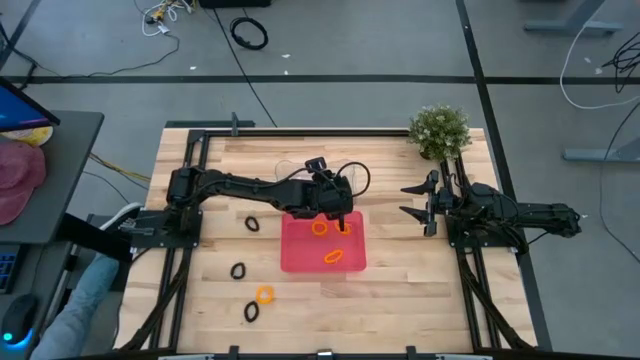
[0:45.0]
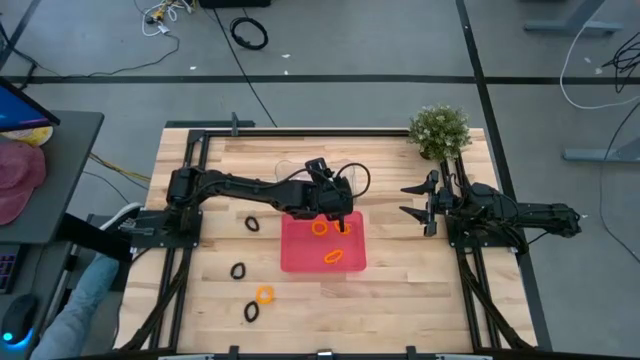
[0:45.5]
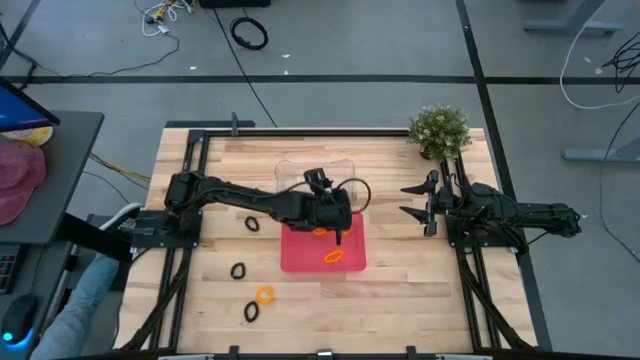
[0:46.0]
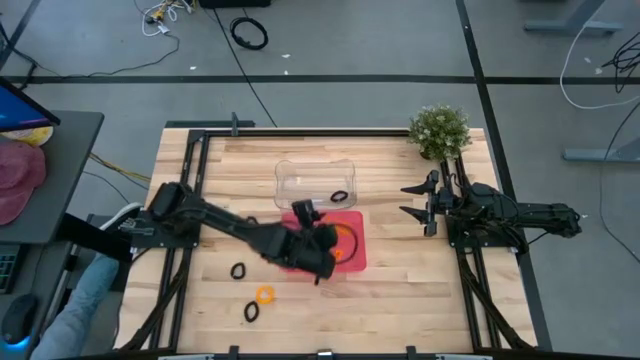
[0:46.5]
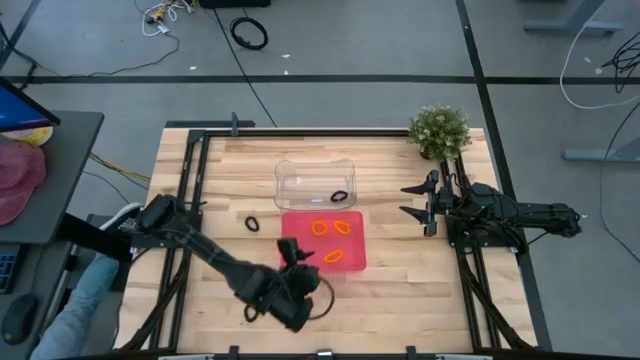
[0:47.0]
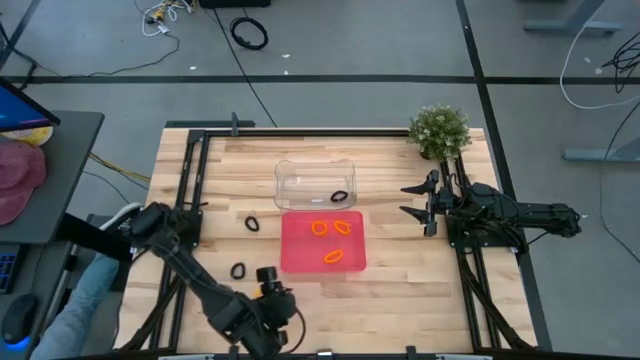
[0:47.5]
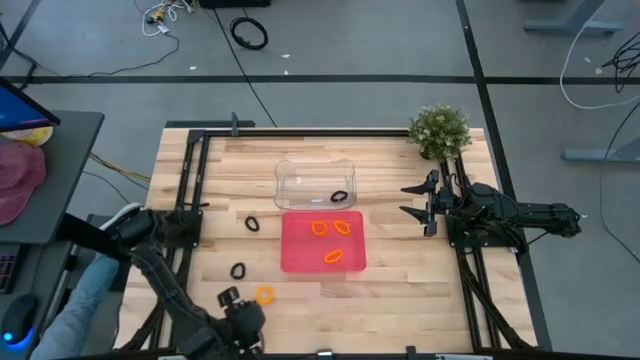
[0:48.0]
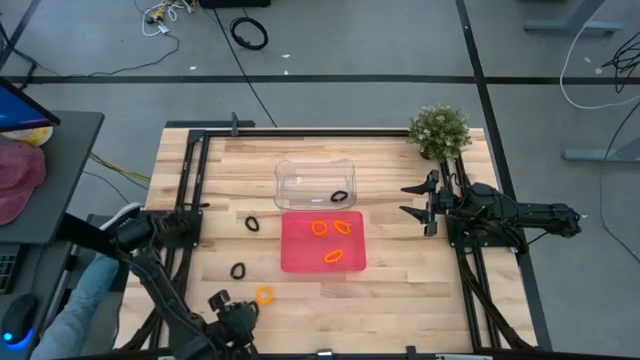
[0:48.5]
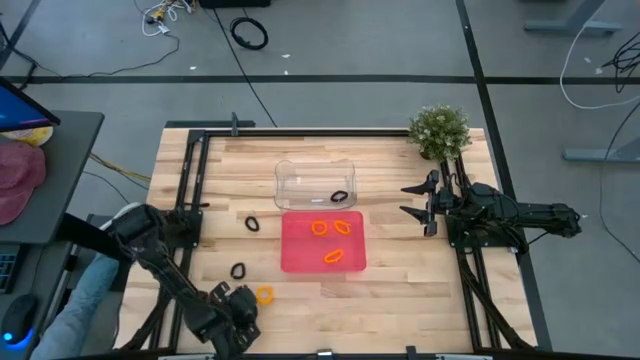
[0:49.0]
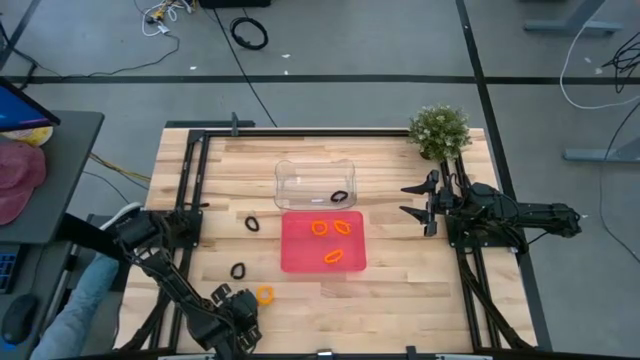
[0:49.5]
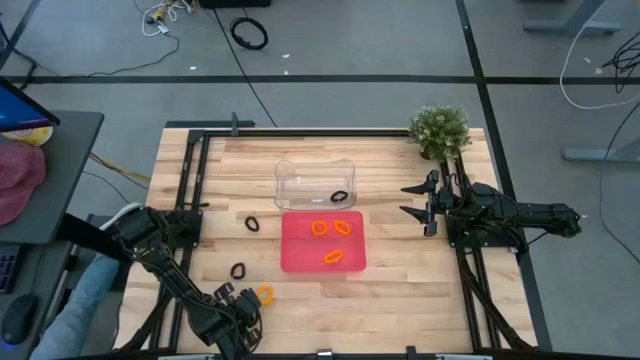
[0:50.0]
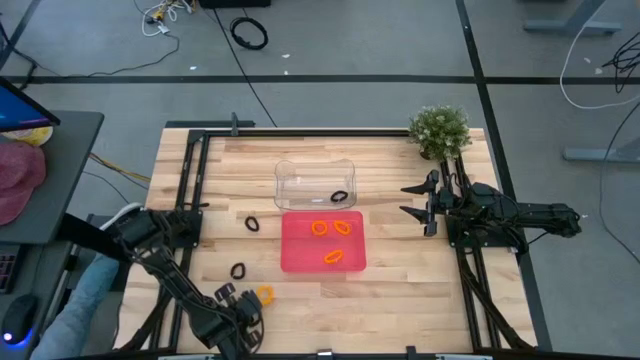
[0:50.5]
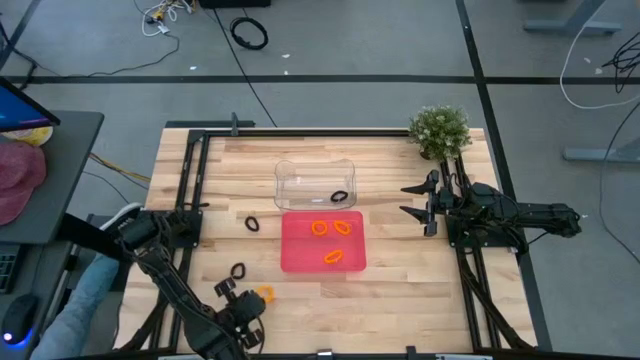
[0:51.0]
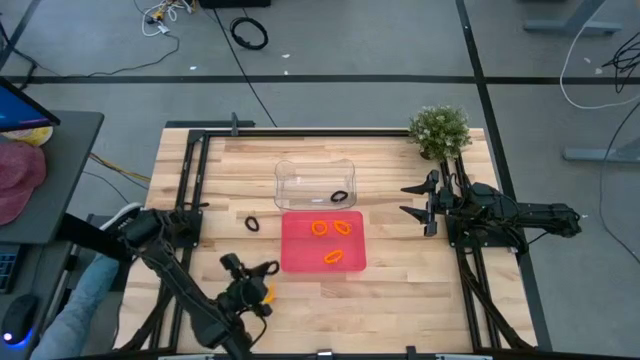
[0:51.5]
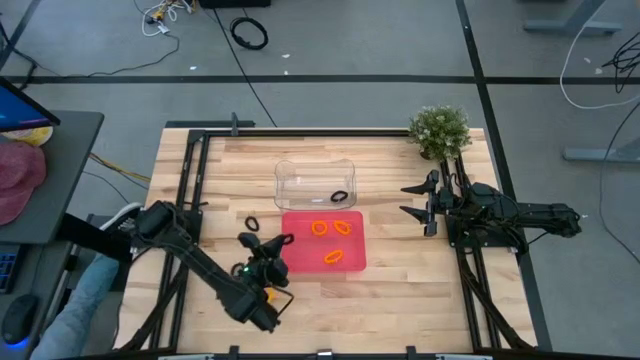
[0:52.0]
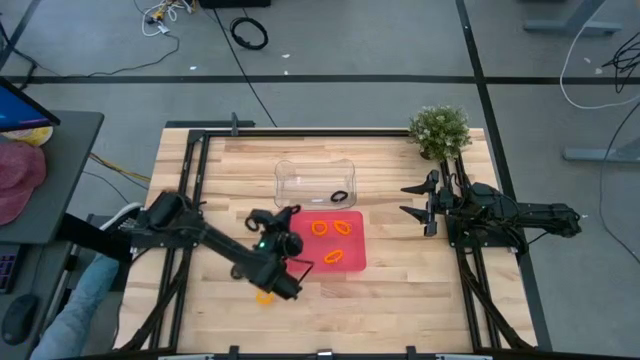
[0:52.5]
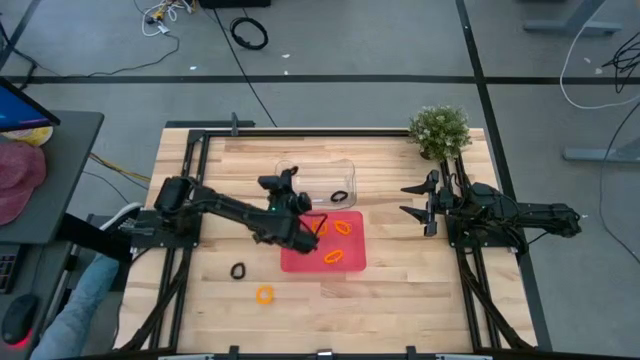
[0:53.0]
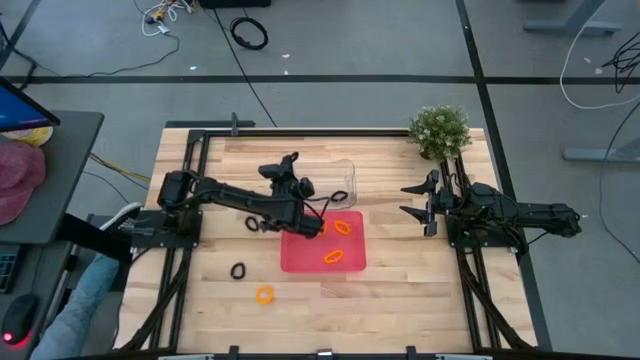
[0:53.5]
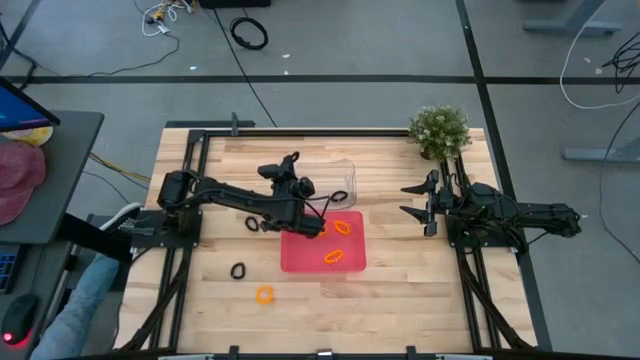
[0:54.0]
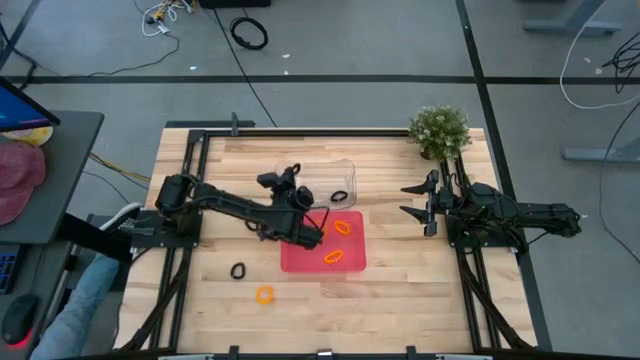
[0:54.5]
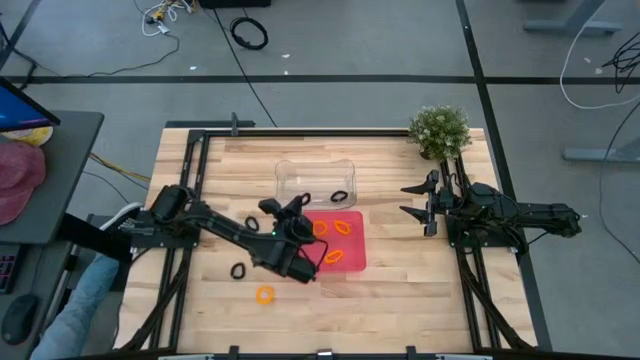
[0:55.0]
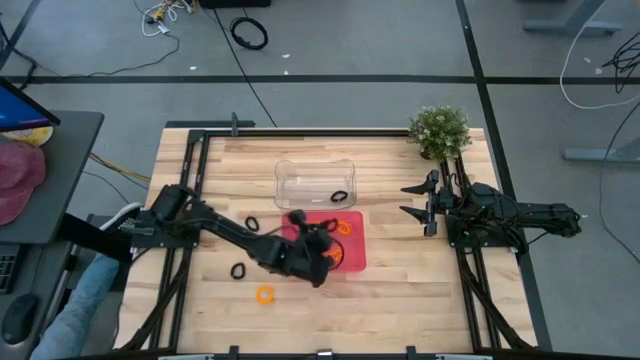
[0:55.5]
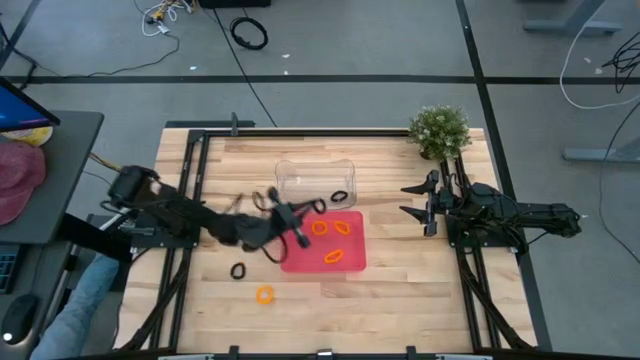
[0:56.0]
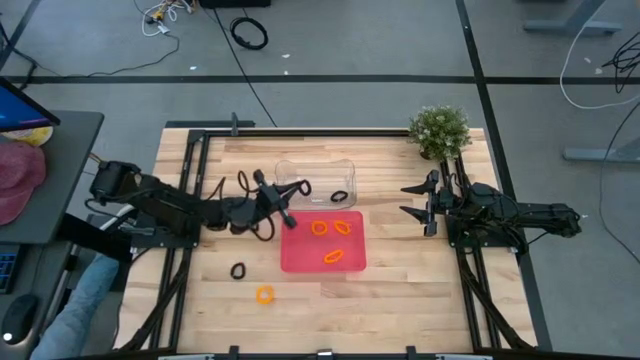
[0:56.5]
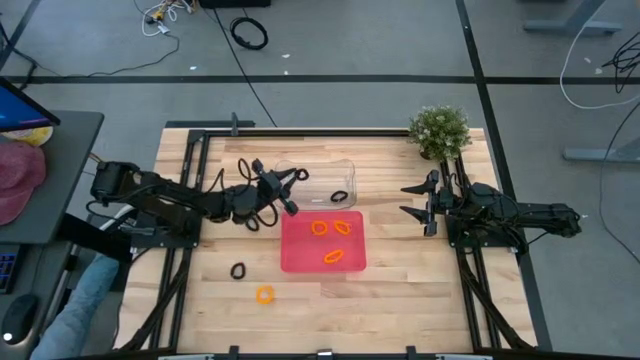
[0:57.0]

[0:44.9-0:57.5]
Task: Sort spring keychains
Put the bottom black spring keychain into the transparent bin

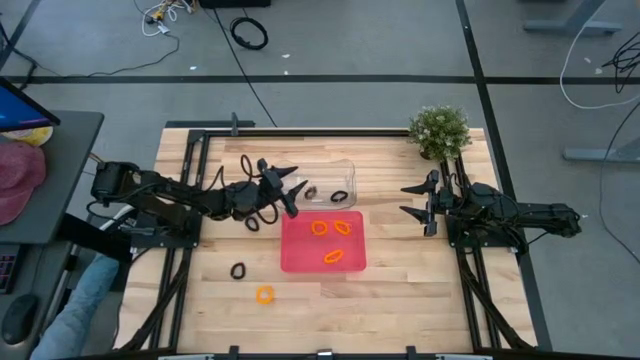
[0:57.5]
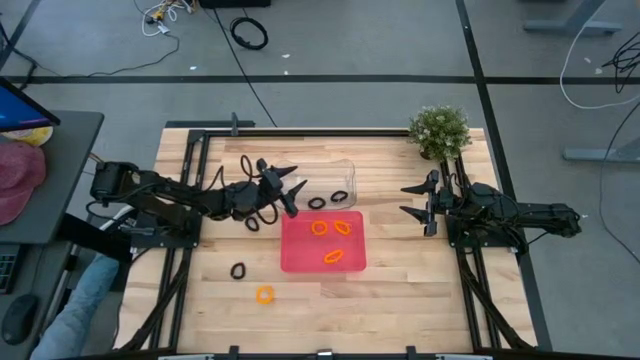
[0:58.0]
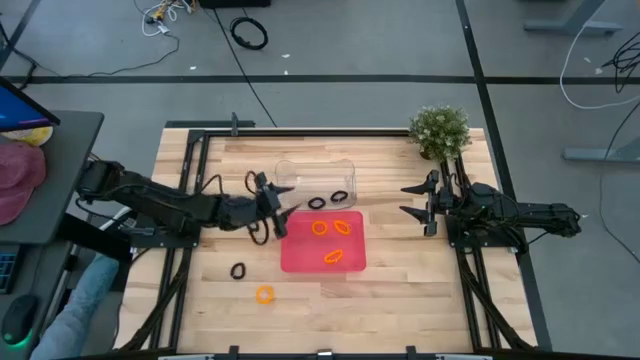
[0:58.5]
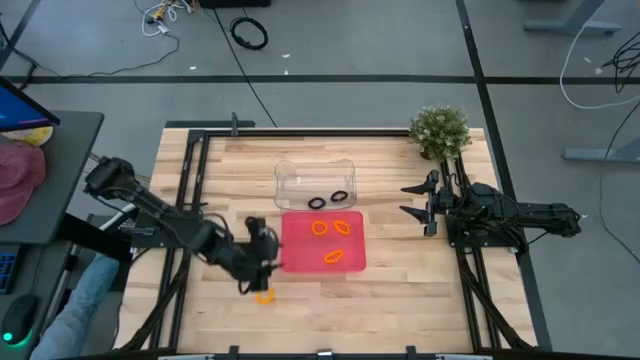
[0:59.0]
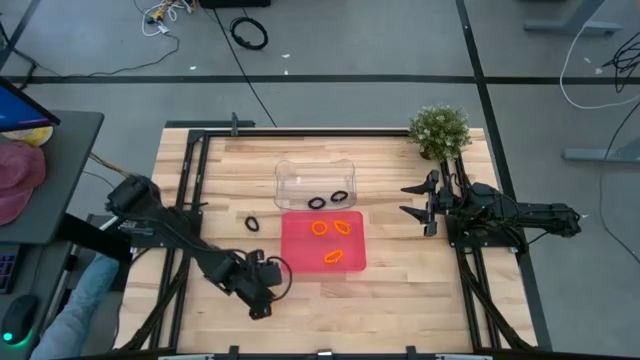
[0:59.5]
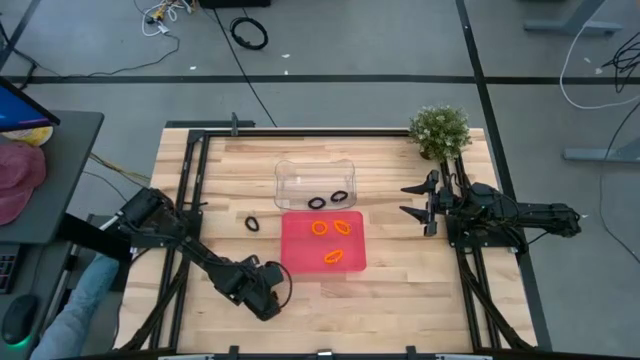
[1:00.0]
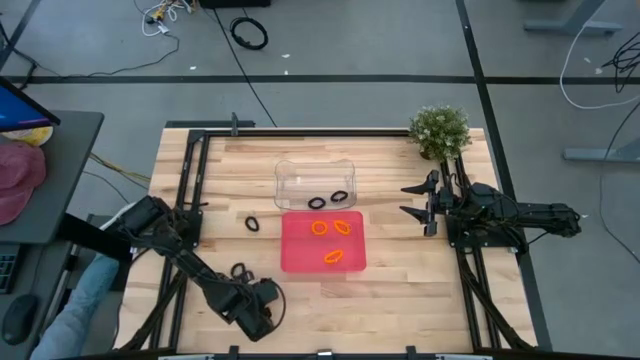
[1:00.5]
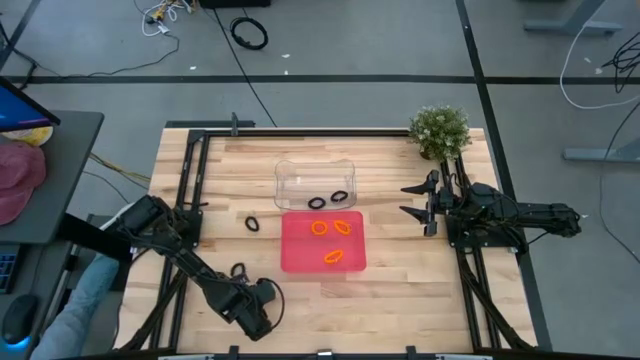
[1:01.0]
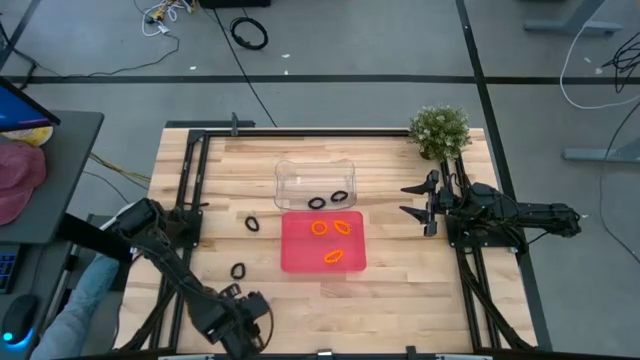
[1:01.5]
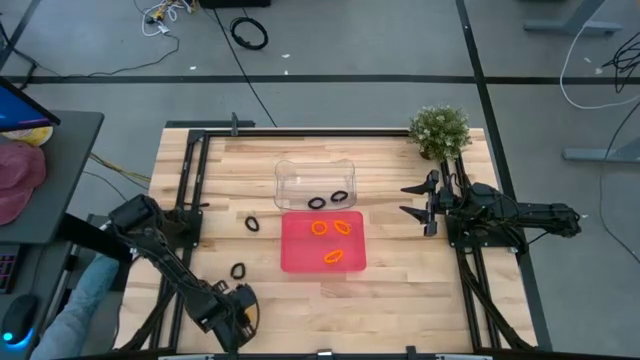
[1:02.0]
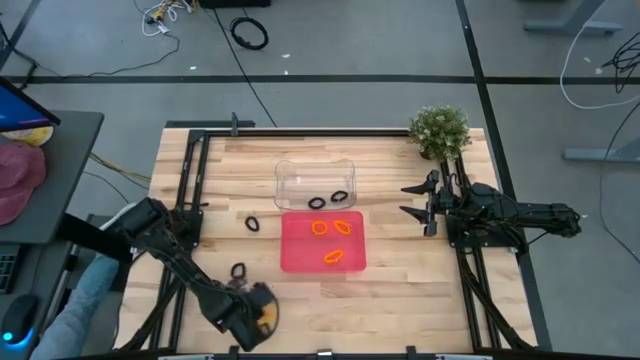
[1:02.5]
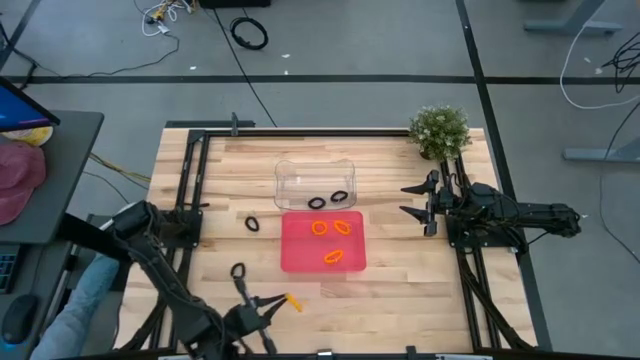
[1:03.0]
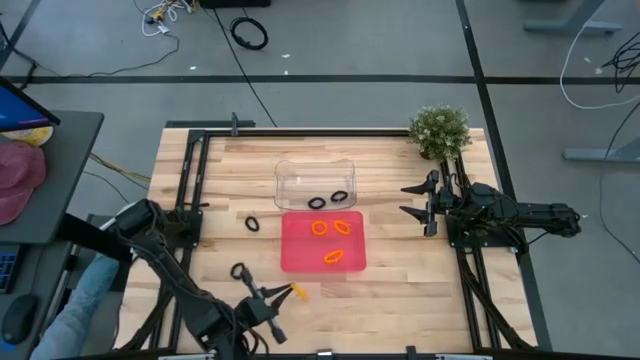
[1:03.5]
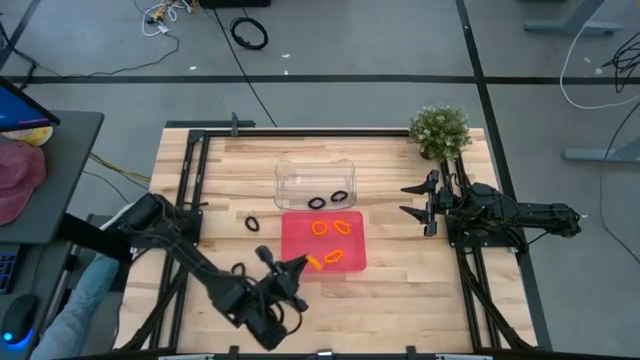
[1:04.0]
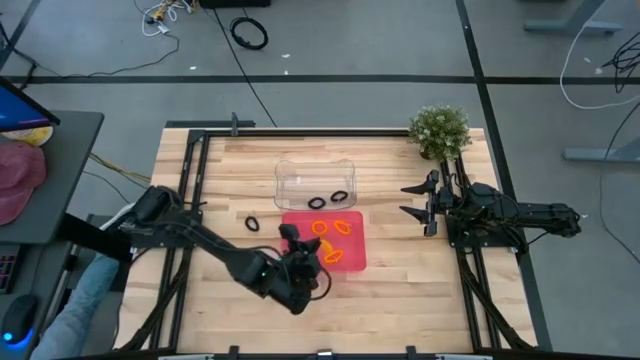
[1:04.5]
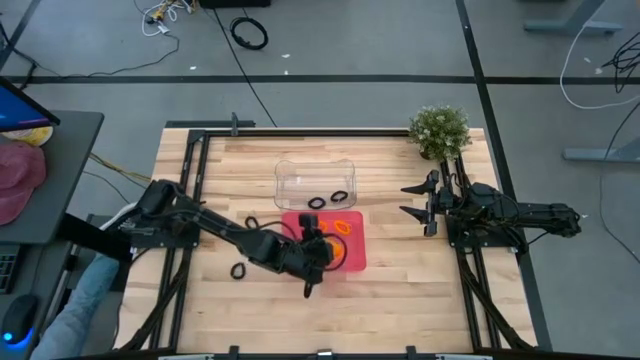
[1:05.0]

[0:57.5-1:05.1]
Put the orange spring keychain into the pink bin

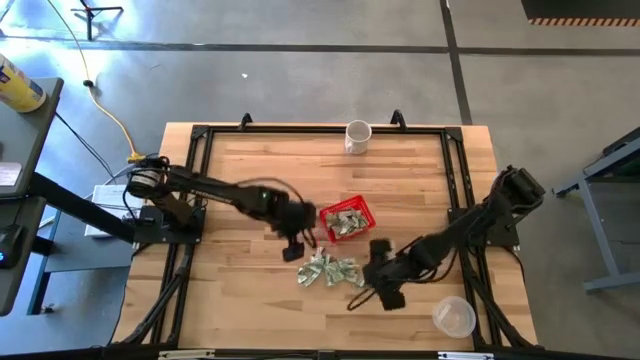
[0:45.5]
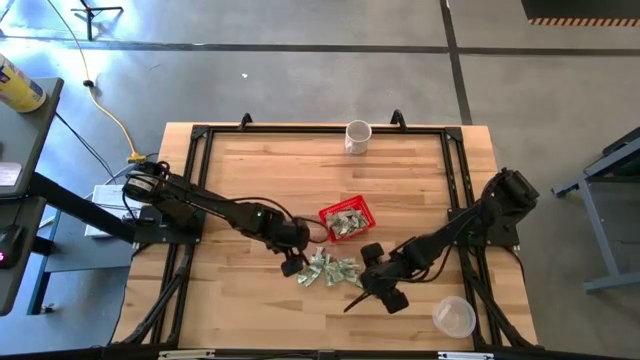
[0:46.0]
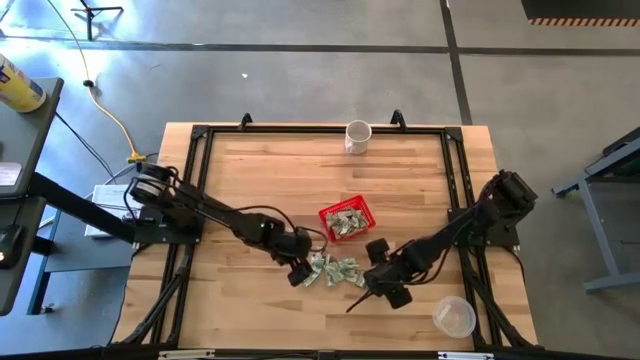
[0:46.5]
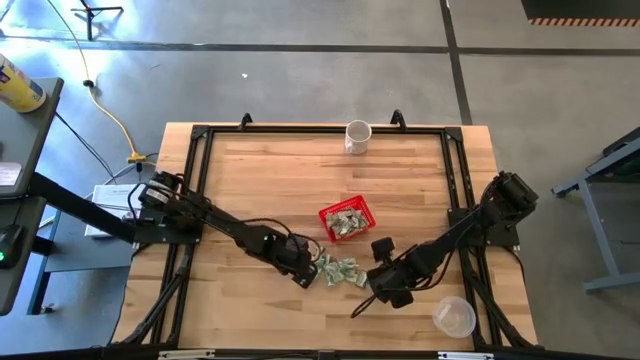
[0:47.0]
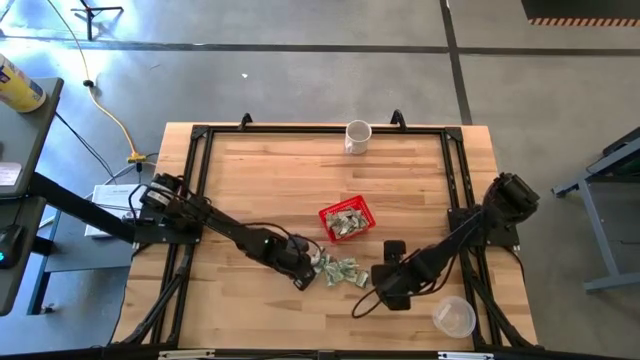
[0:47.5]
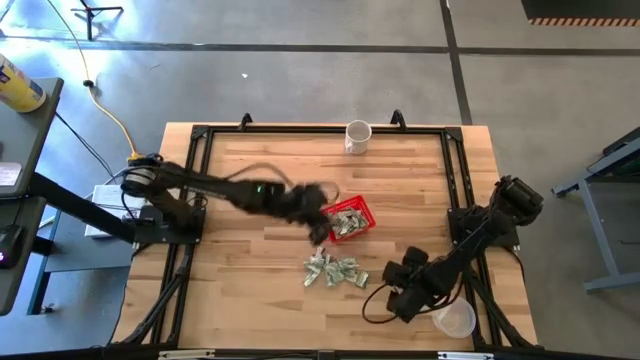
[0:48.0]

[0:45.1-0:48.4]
Task: Pick and place items into bin
Put the white stevia packet into the red bin
